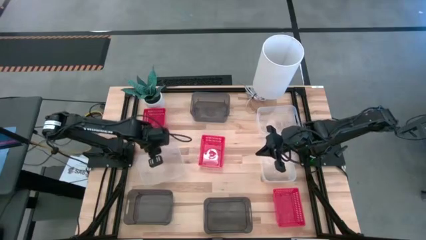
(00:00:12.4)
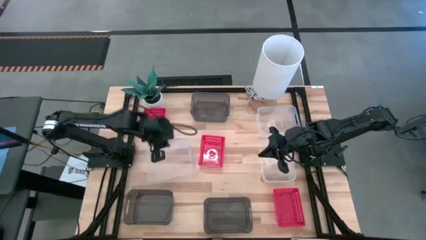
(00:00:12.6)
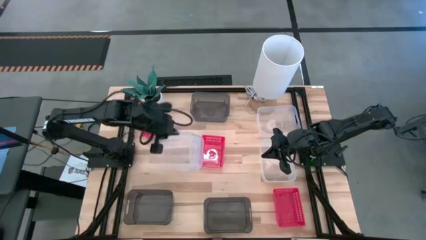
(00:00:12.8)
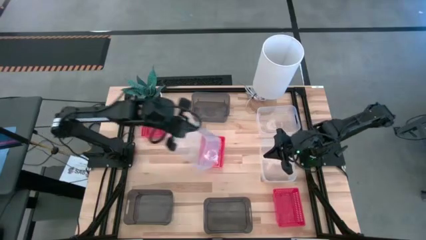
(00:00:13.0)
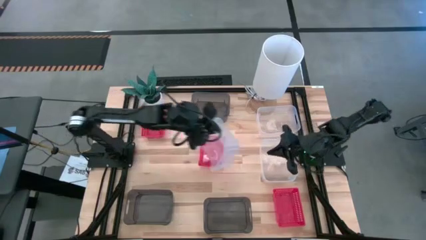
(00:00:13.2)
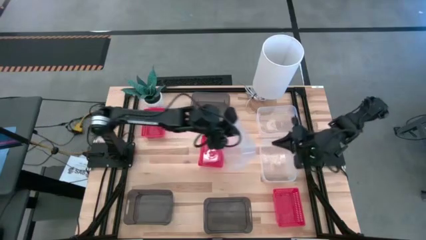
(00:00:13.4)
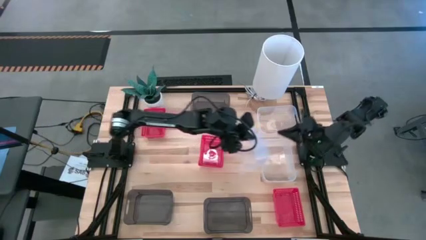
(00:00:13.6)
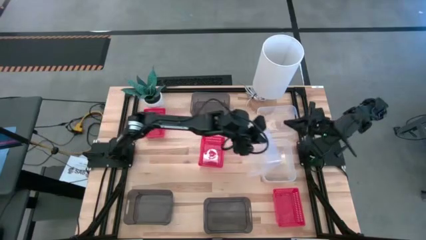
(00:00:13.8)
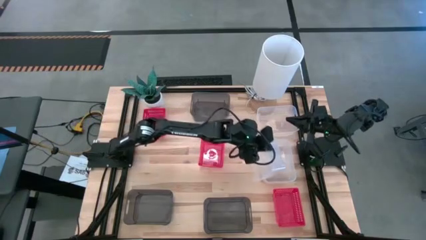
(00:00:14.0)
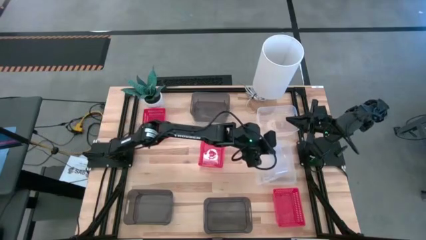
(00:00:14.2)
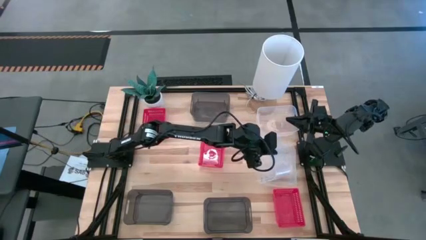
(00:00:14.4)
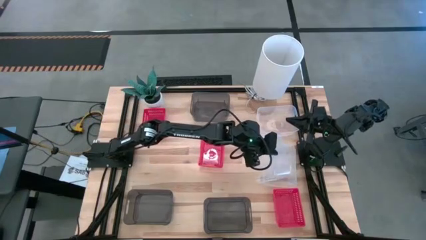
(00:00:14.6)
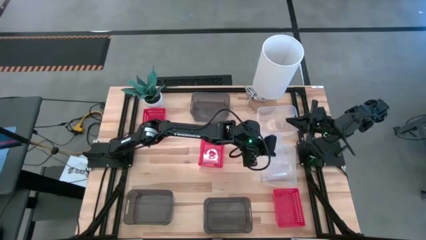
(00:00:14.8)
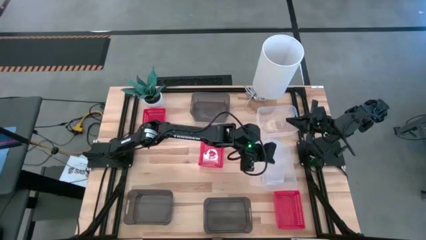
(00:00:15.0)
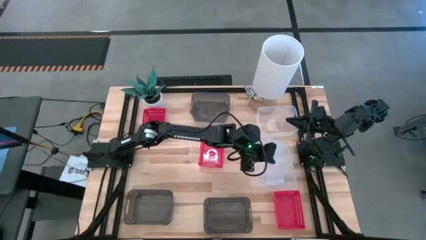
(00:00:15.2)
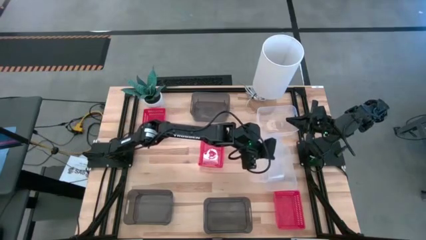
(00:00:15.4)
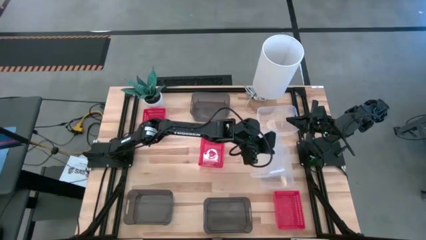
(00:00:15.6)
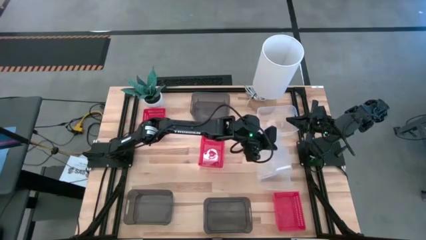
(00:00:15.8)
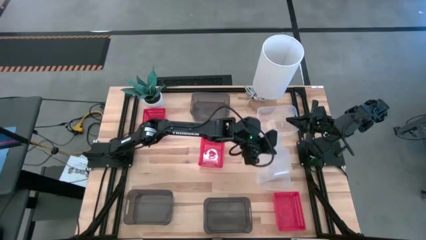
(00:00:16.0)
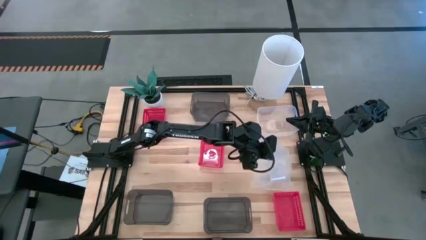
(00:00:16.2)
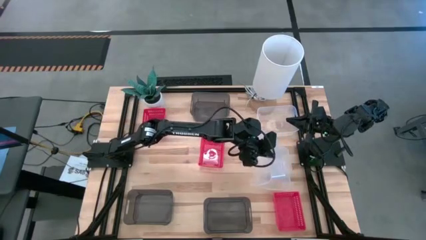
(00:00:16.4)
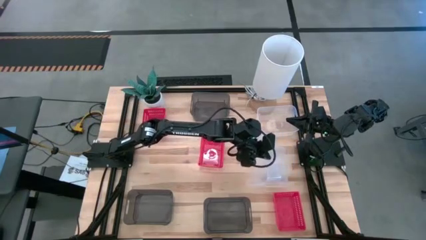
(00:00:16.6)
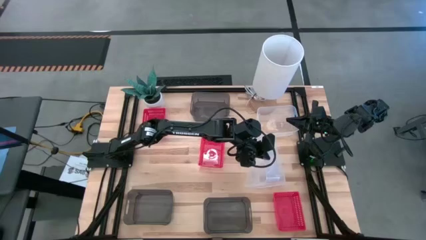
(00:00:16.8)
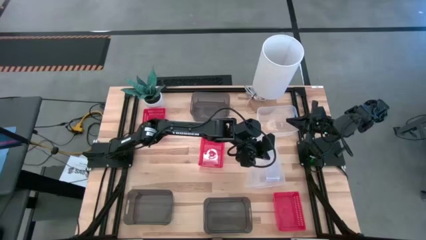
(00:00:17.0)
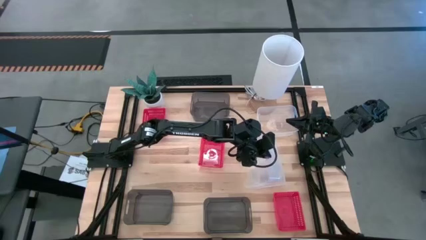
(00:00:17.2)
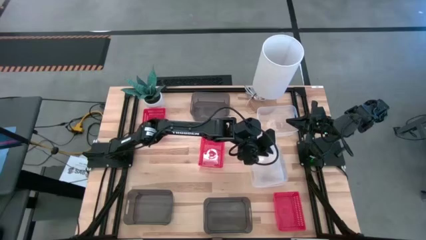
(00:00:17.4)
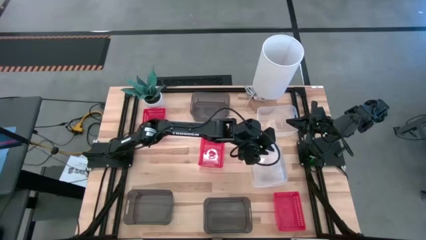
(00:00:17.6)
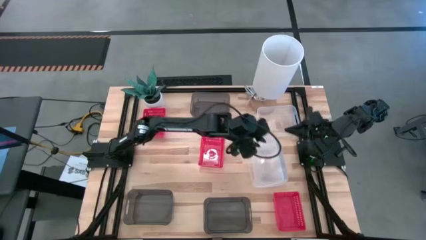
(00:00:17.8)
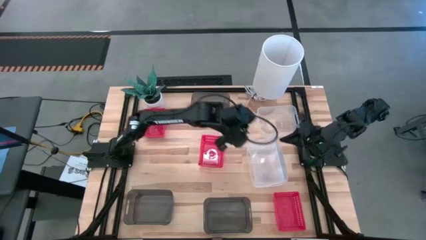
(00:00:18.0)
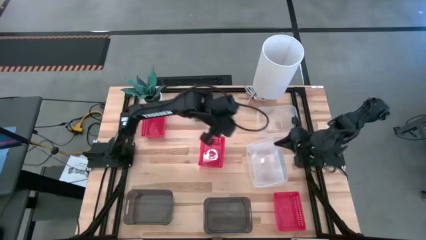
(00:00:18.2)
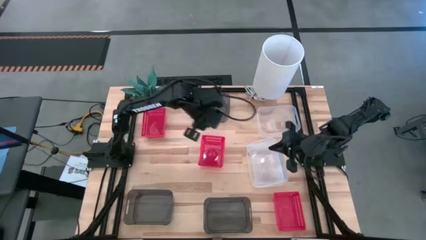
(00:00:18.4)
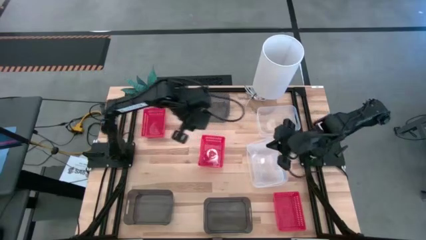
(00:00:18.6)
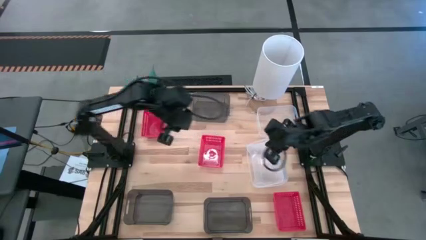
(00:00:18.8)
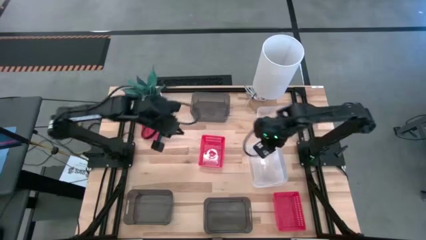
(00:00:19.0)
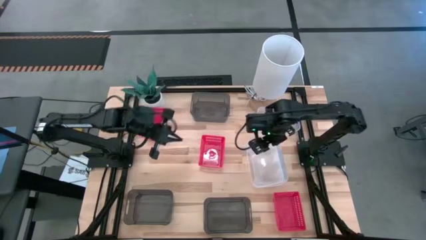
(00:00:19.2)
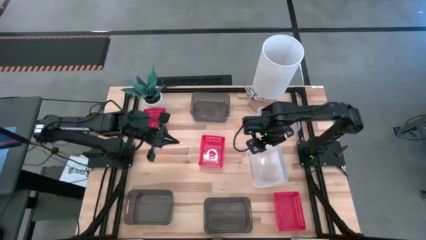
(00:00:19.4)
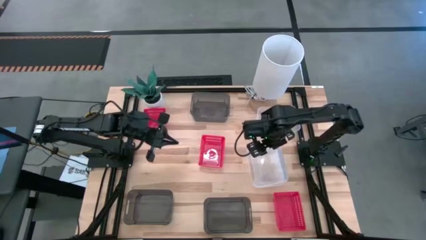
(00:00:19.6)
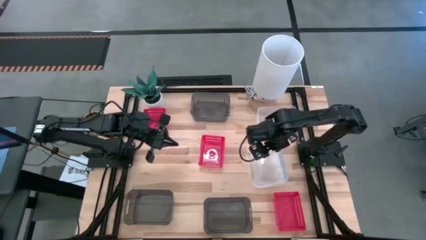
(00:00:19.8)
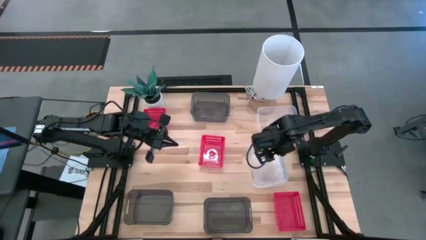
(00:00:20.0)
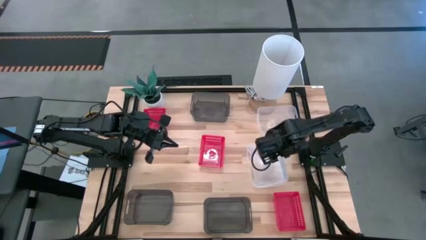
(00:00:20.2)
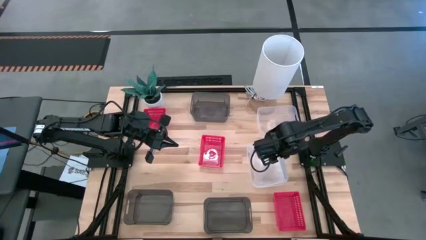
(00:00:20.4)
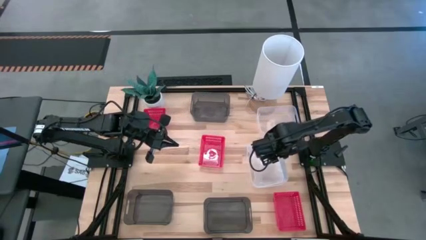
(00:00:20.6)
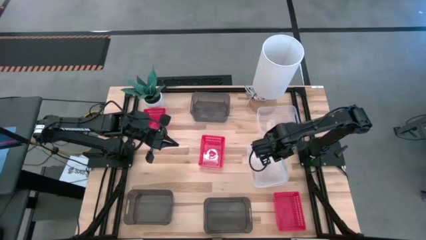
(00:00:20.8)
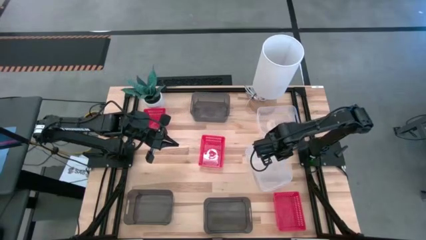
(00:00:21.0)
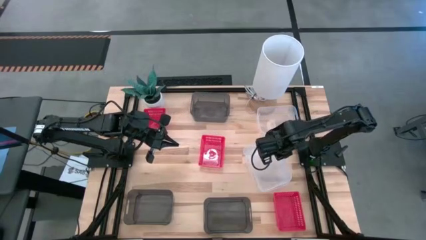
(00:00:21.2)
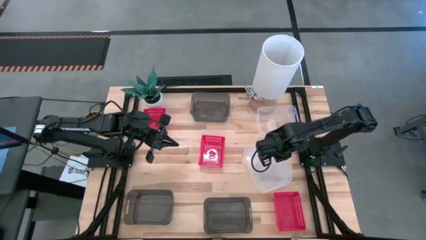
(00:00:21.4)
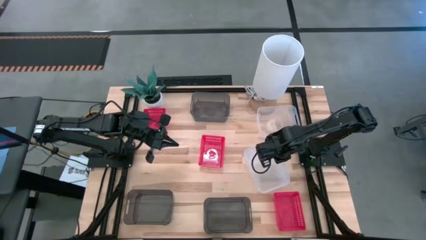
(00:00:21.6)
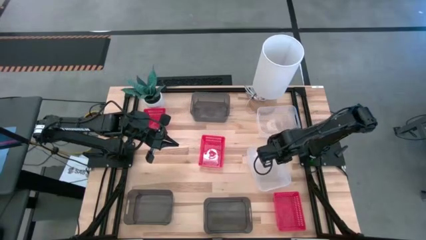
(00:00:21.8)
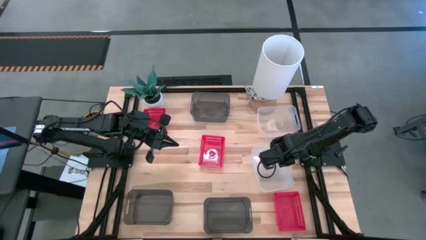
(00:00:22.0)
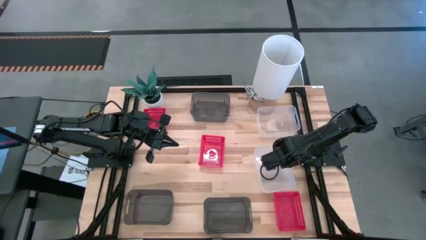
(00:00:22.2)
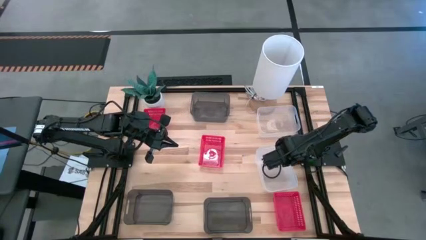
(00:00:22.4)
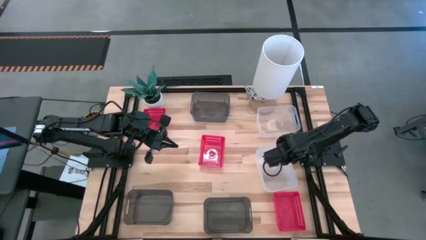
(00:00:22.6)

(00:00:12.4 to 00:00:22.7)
Stack the bottom left transparent bin on top of the bottom right transparent bin
